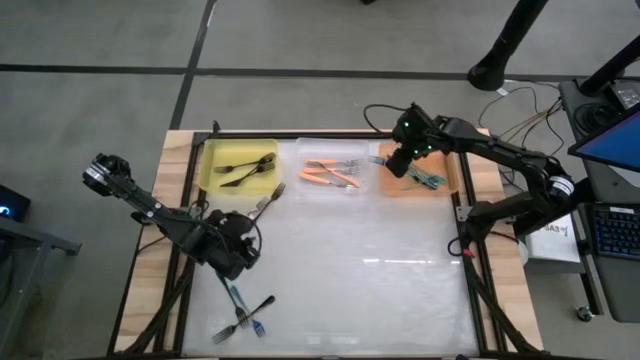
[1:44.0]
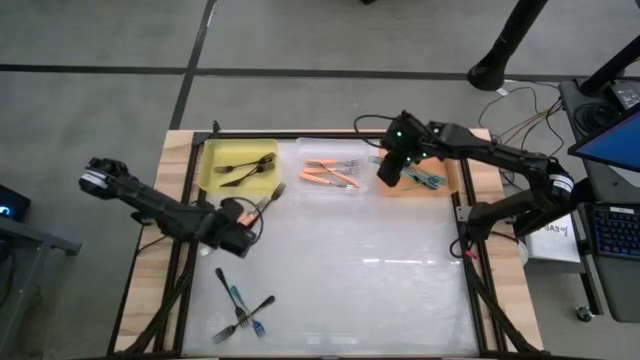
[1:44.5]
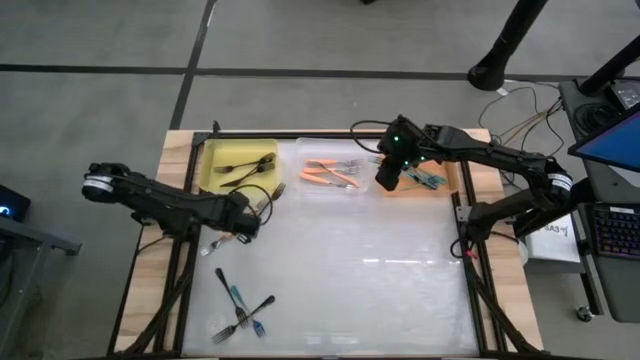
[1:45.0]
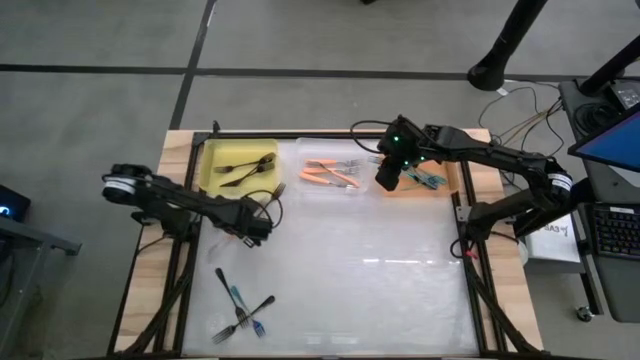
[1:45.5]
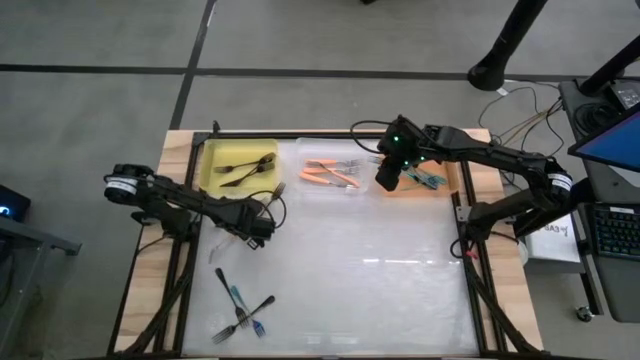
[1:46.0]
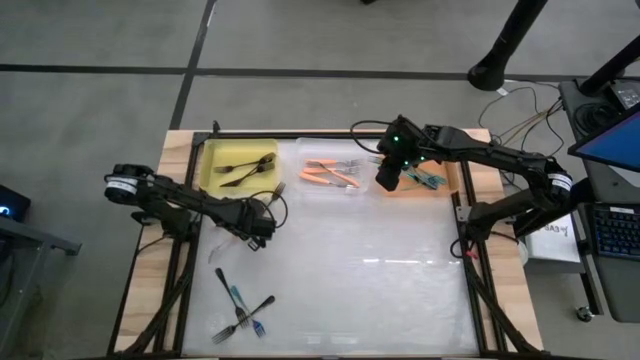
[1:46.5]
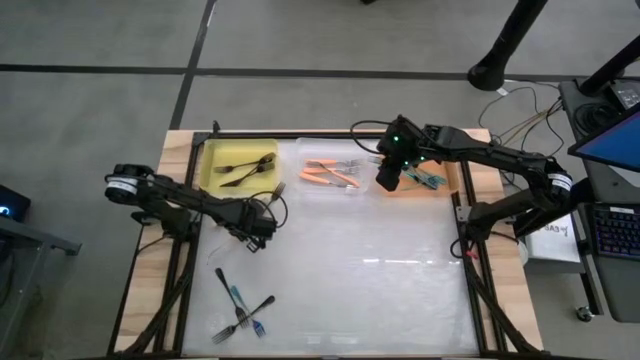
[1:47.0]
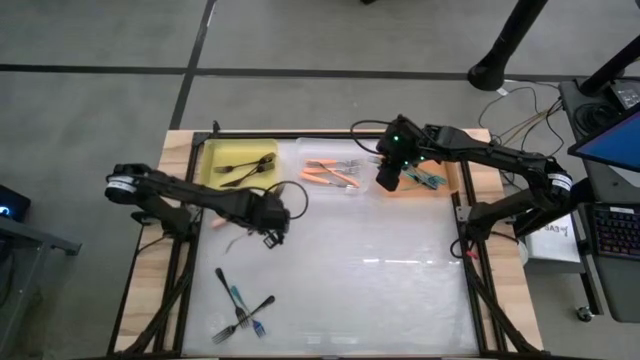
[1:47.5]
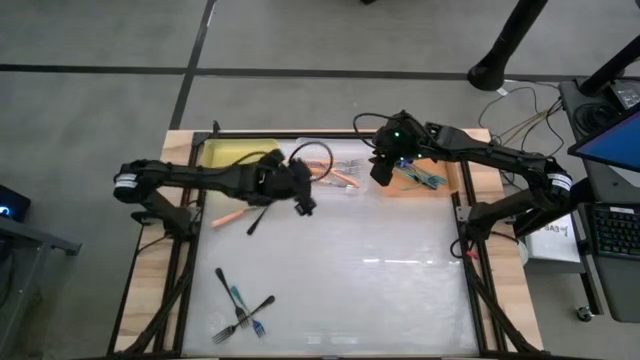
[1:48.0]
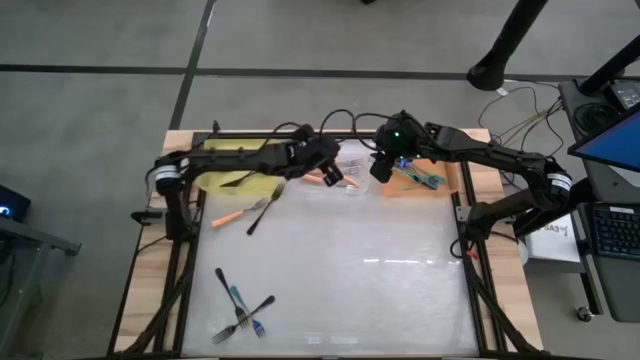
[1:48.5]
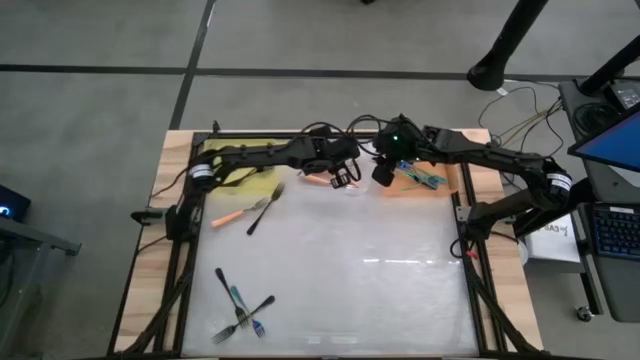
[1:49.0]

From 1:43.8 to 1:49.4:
Task: Sort silverware by color (type)
Put the orange fork into the transparent bin

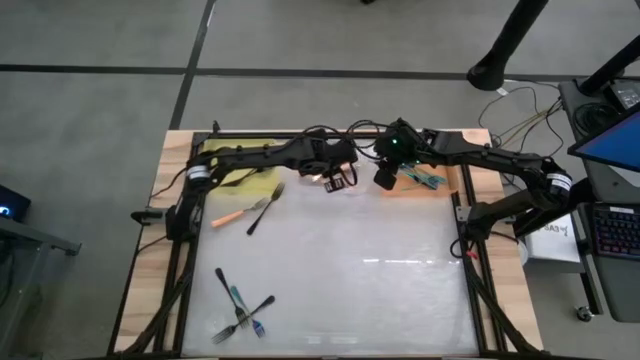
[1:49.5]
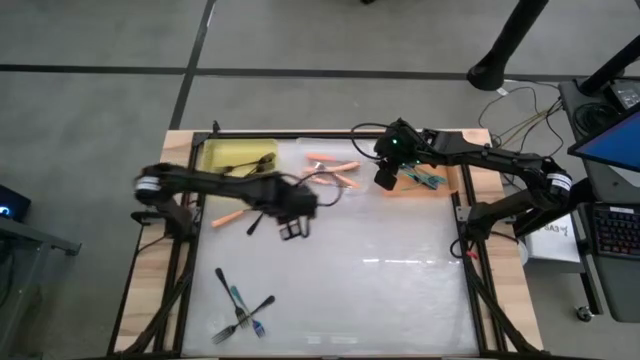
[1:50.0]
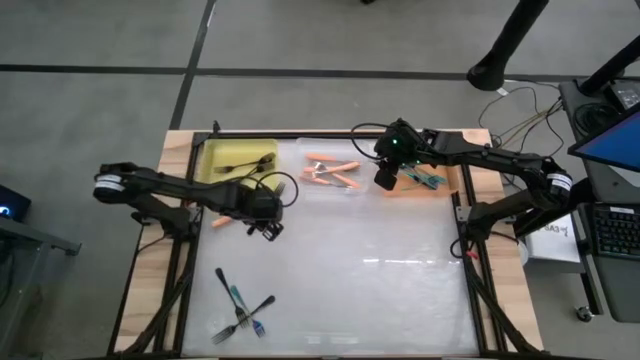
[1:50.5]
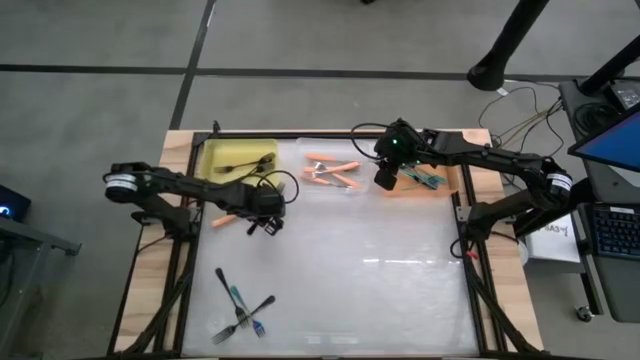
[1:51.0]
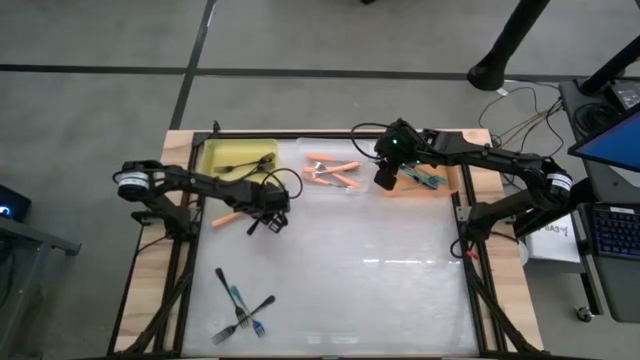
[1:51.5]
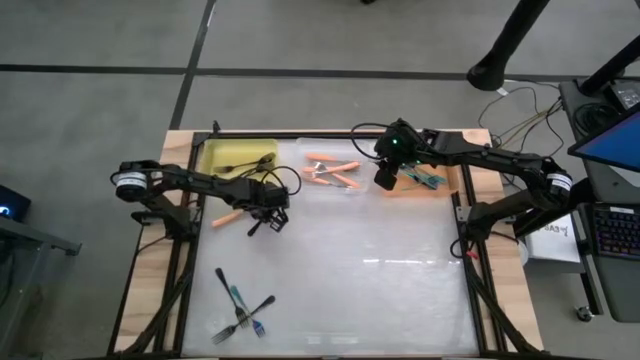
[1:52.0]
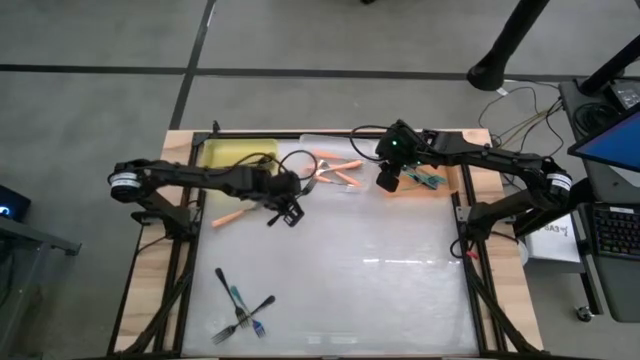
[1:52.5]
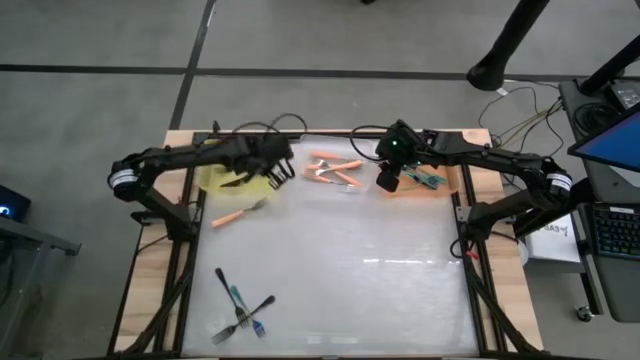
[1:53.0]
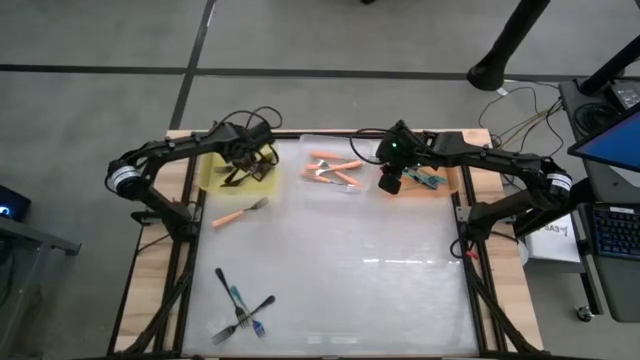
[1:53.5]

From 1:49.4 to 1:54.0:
Put the black fork into the yellow bin

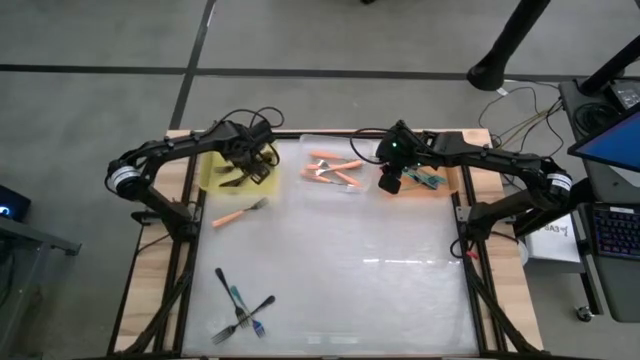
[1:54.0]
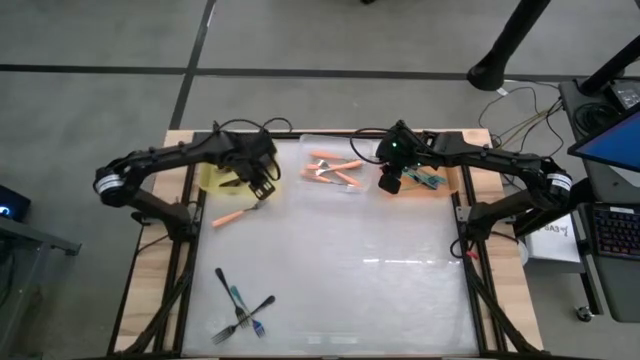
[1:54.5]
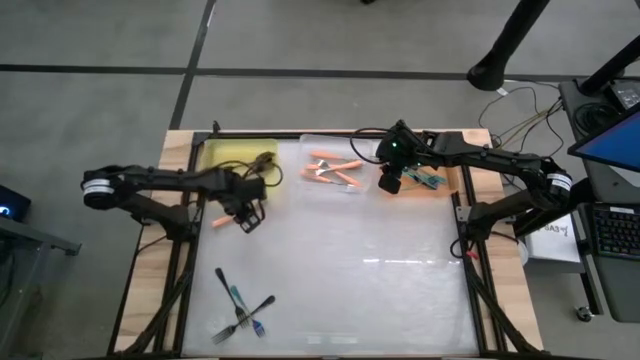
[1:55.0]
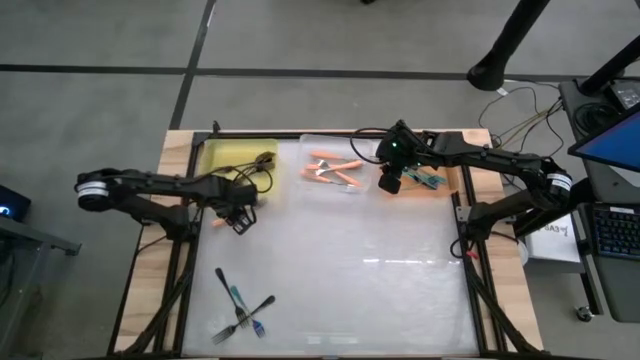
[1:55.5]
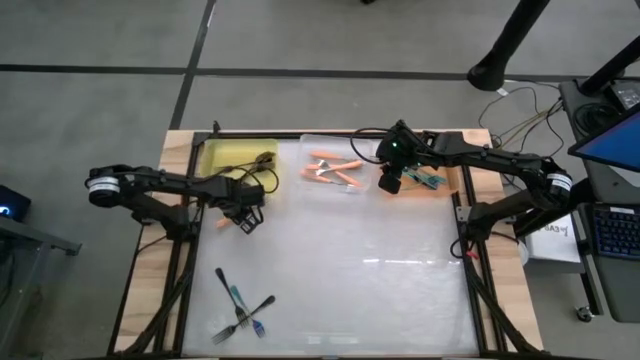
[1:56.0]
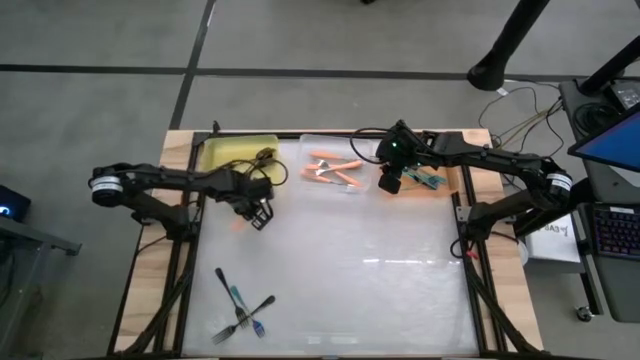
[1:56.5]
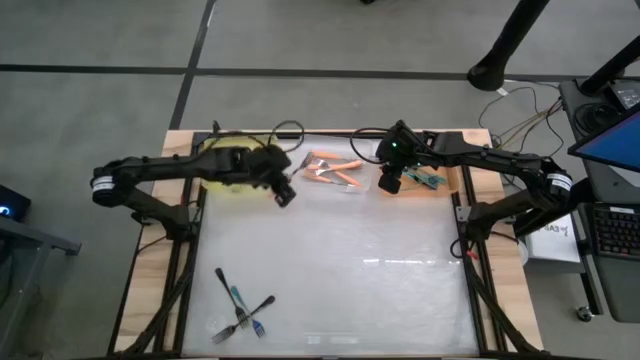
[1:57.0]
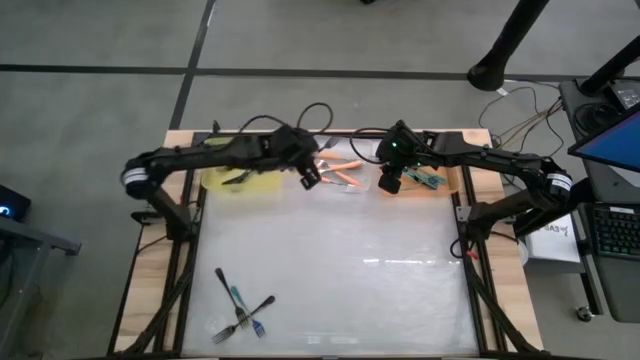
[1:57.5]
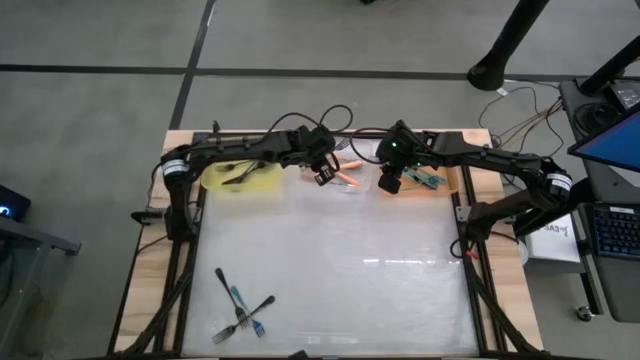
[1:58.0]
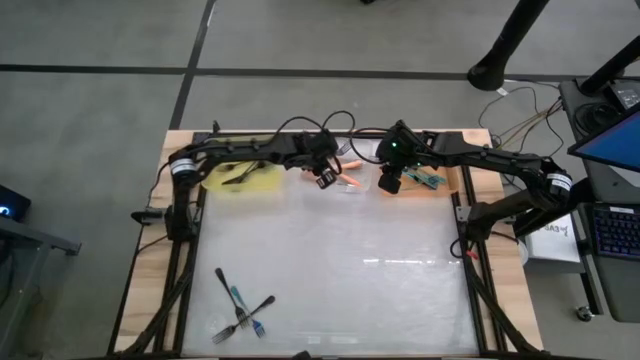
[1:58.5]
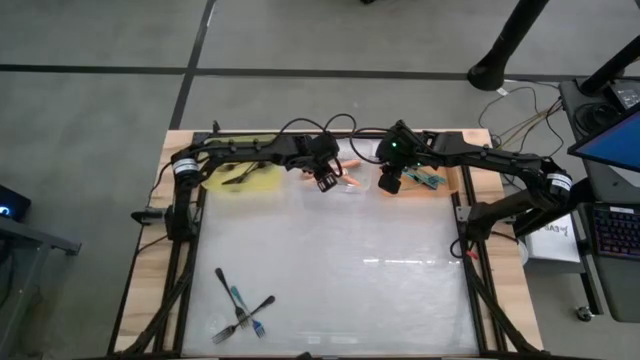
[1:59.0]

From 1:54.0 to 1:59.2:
Put the orange fork into the transparent bin

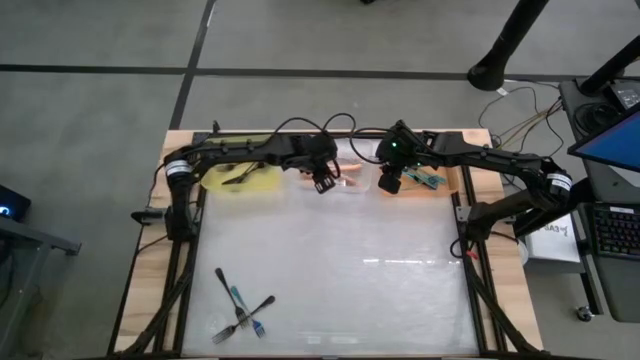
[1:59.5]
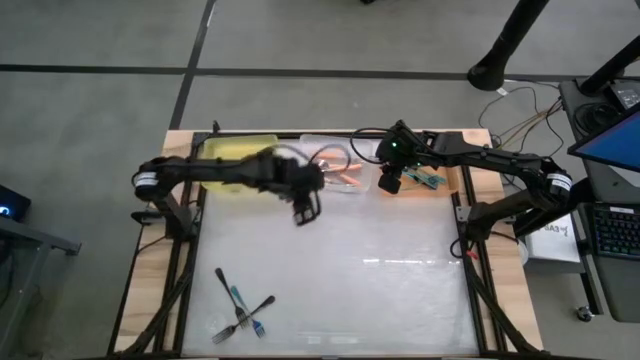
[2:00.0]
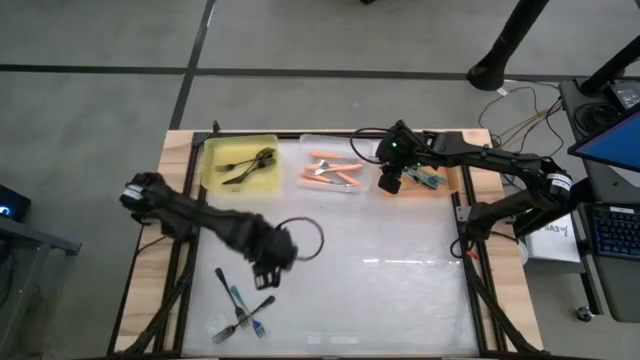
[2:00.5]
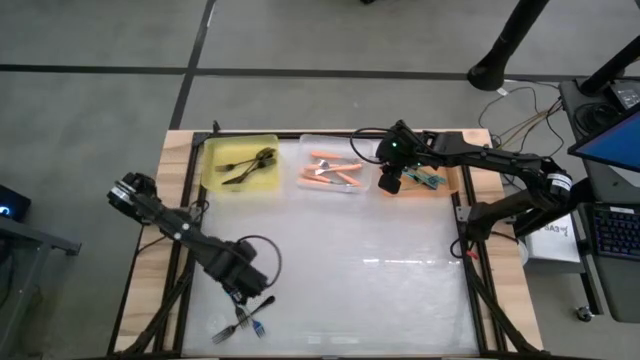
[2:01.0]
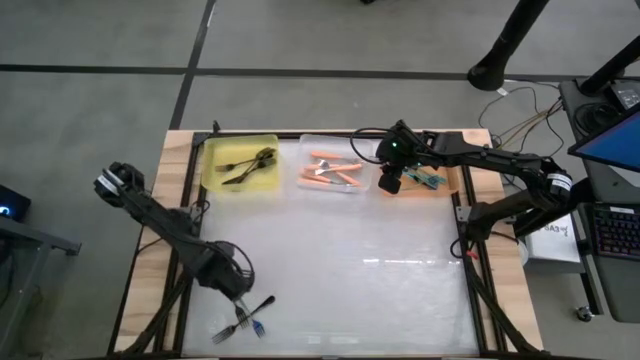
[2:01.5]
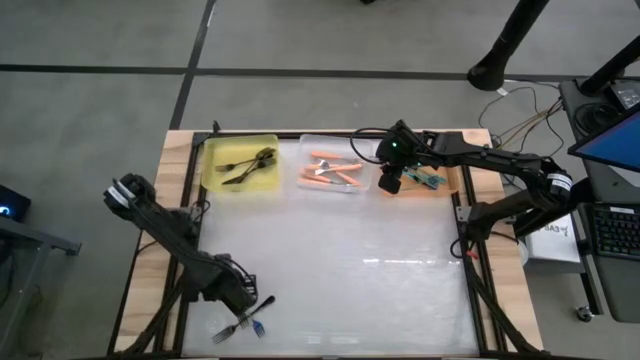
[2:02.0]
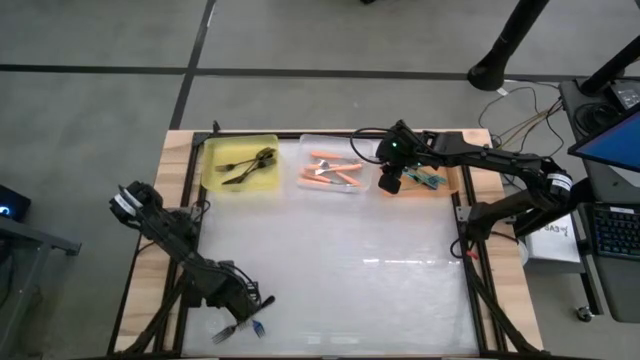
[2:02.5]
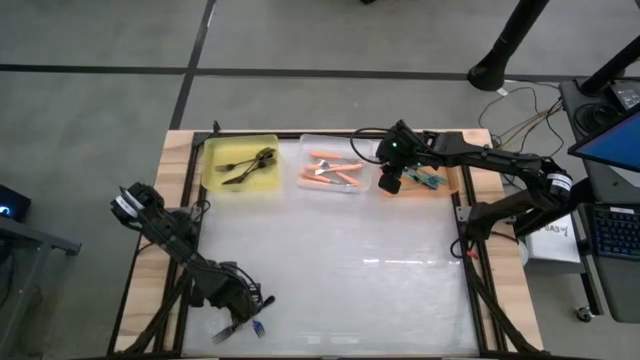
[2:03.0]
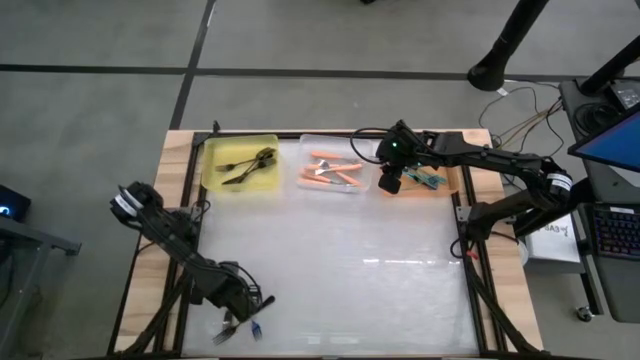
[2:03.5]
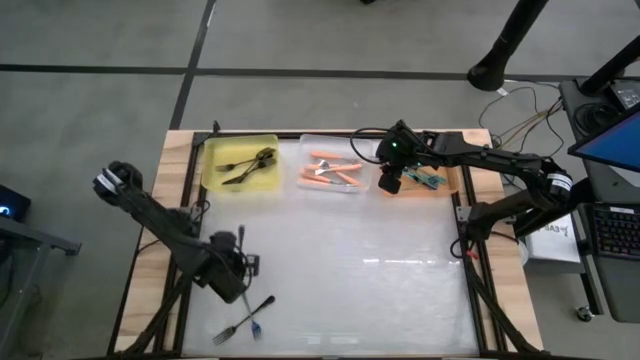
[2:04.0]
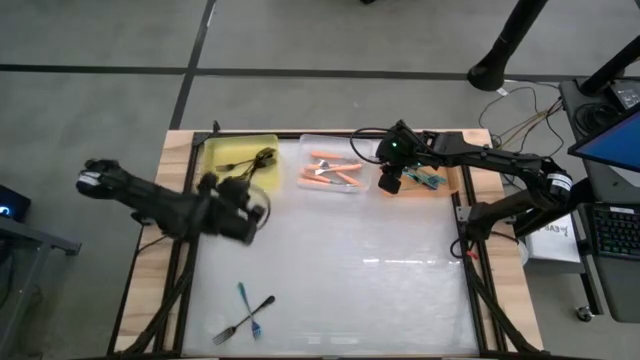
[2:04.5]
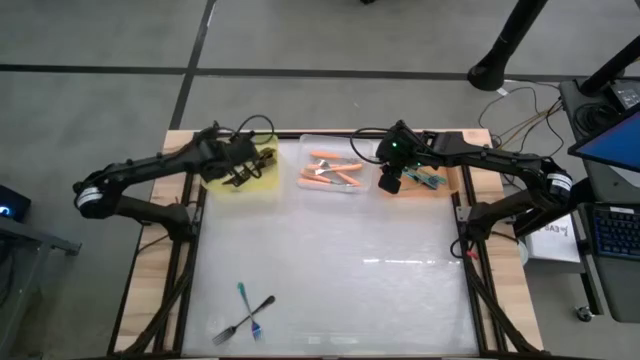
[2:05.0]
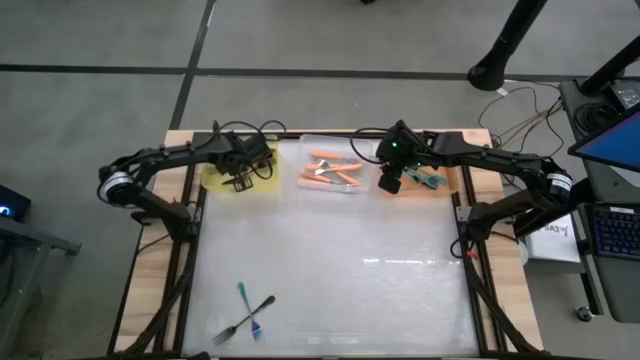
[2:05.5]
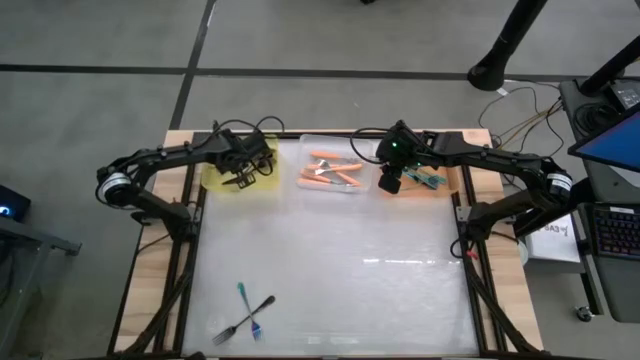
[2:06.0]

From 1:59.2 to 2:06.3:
Put the black fork into the yellow bin
